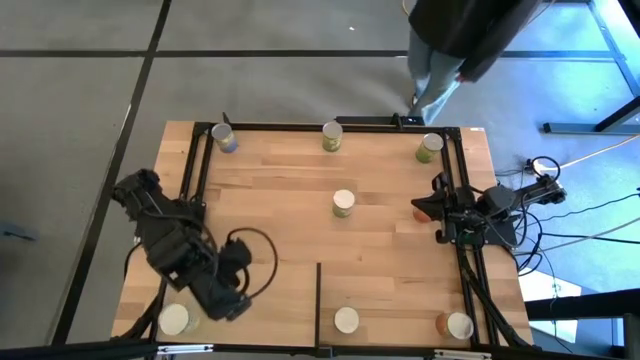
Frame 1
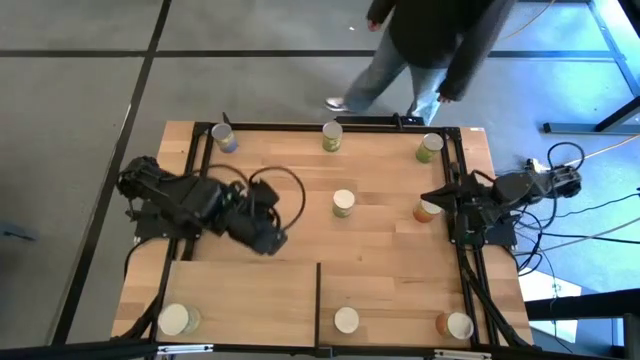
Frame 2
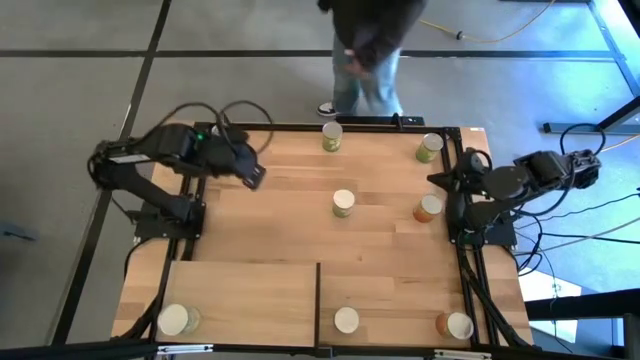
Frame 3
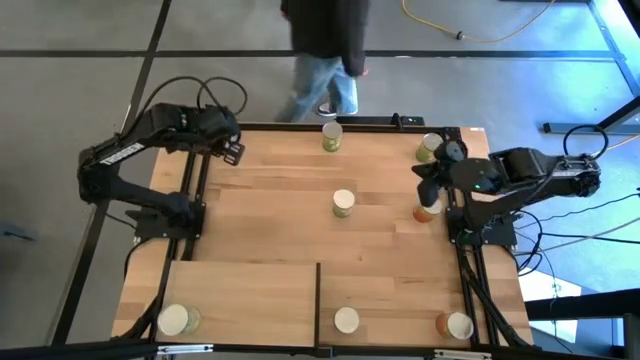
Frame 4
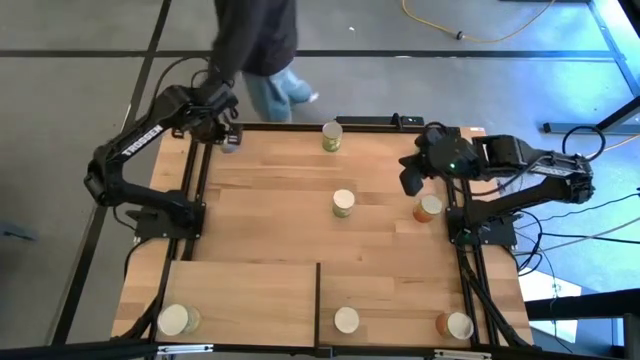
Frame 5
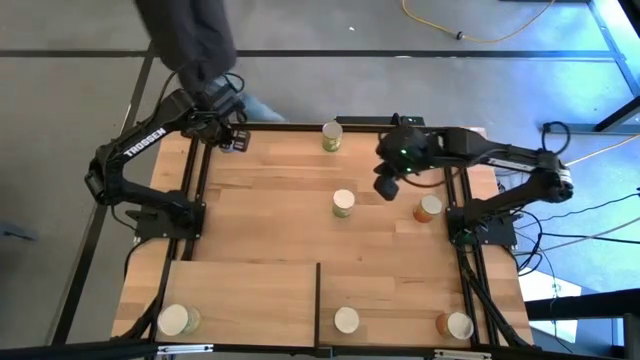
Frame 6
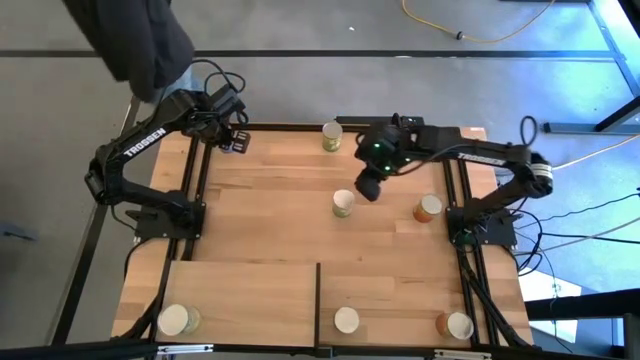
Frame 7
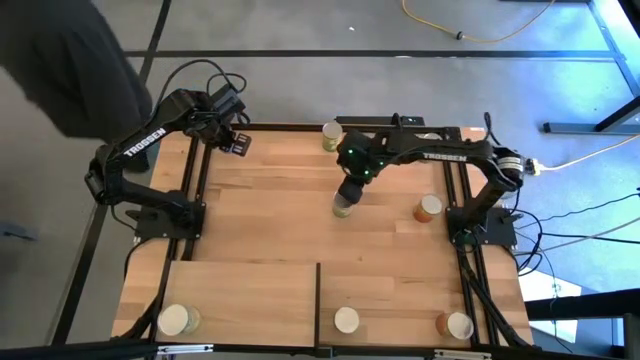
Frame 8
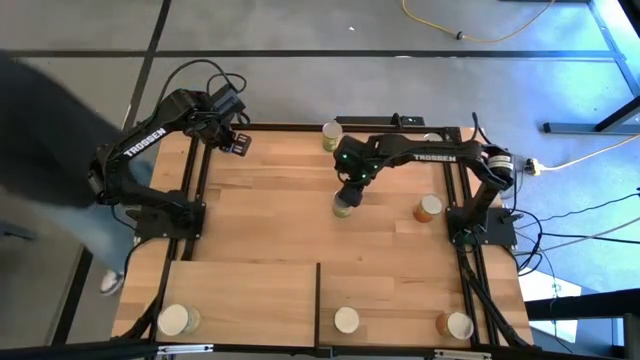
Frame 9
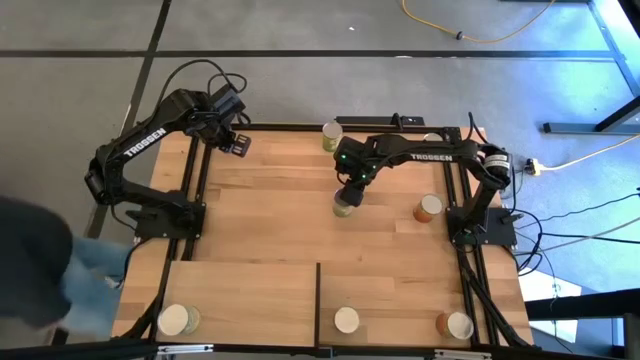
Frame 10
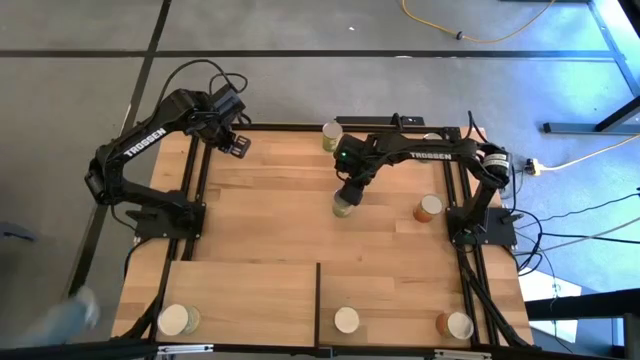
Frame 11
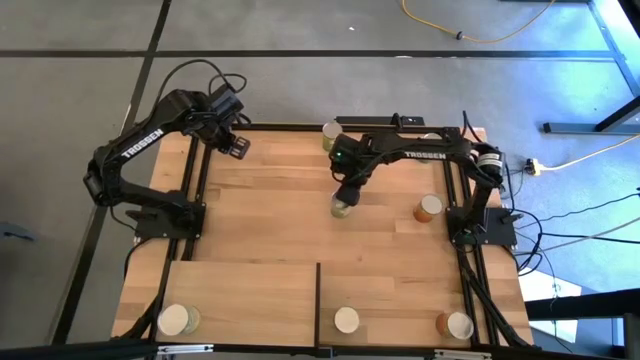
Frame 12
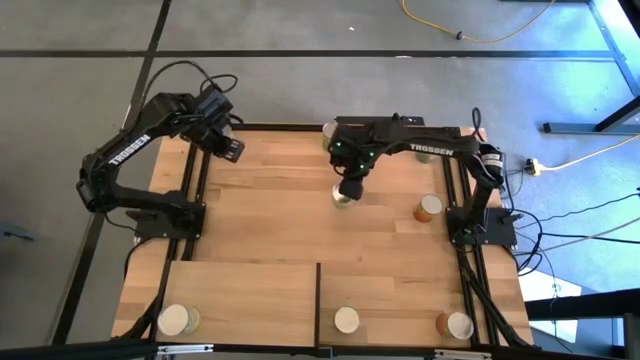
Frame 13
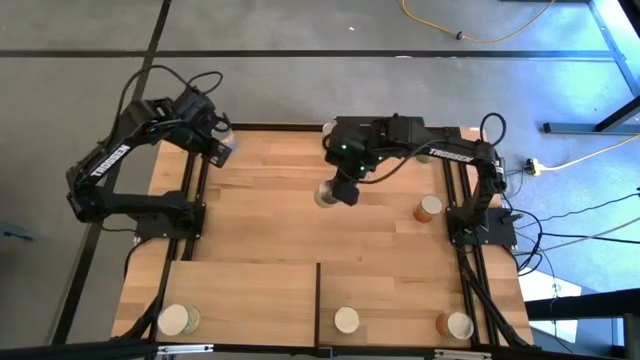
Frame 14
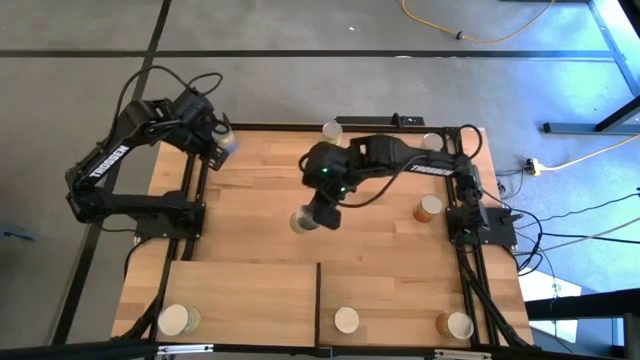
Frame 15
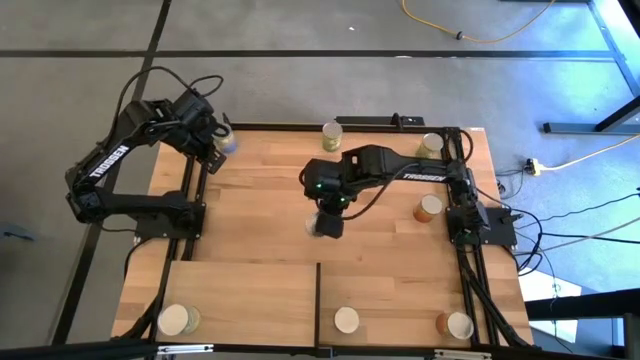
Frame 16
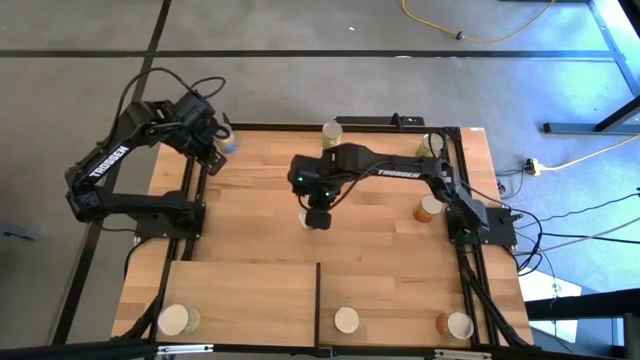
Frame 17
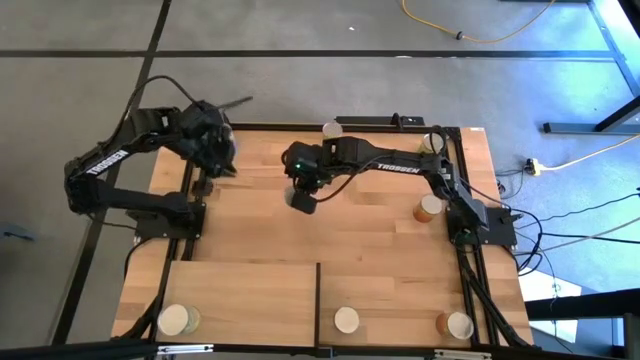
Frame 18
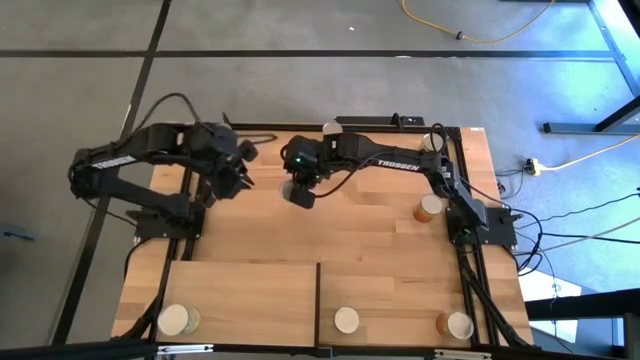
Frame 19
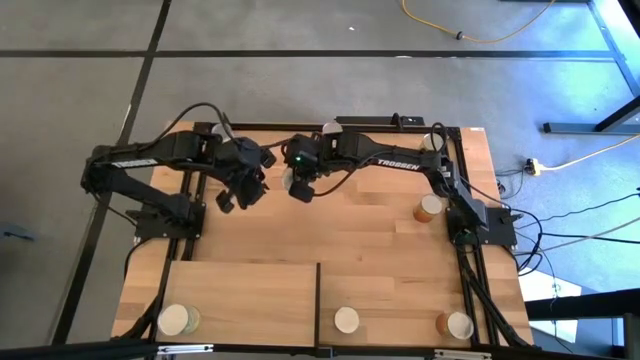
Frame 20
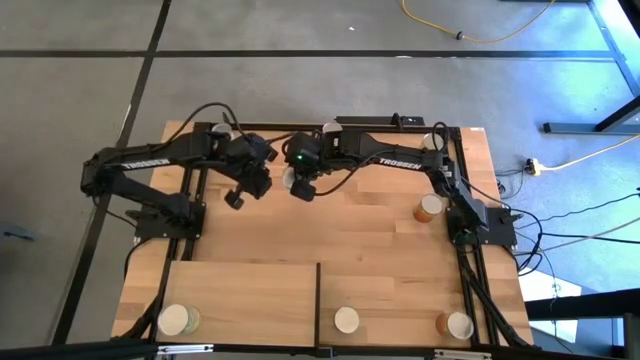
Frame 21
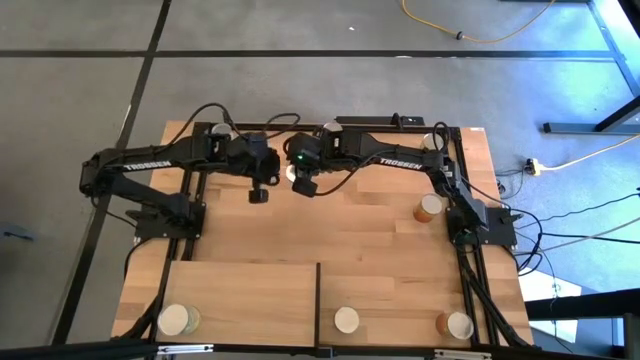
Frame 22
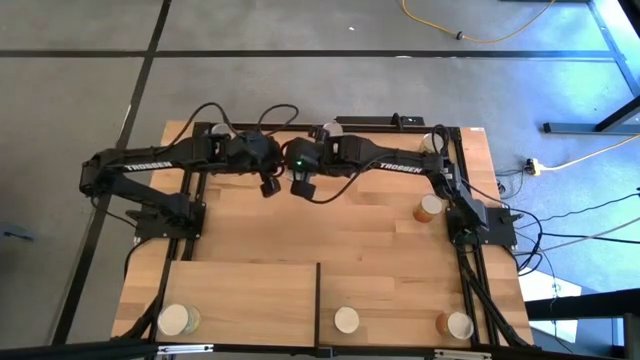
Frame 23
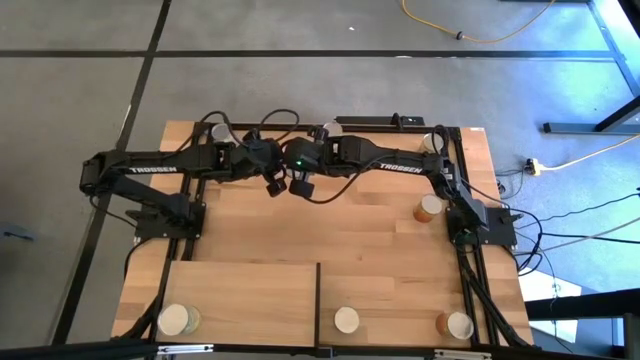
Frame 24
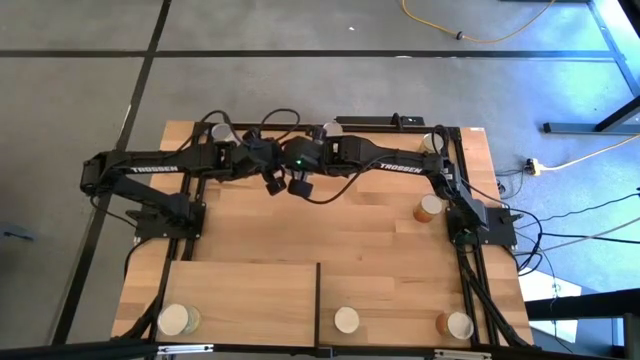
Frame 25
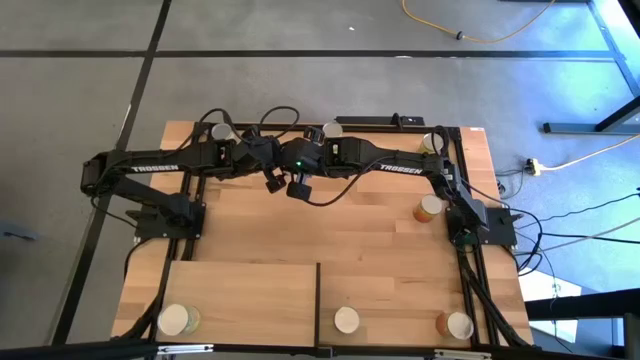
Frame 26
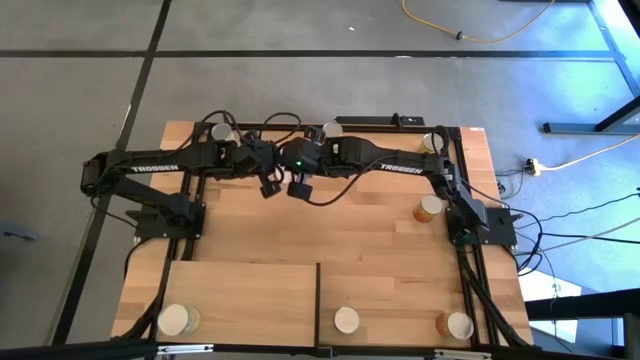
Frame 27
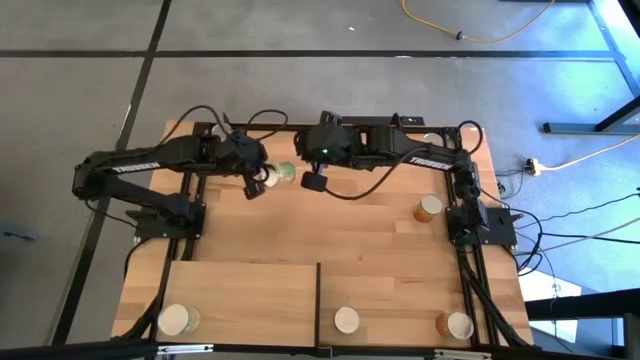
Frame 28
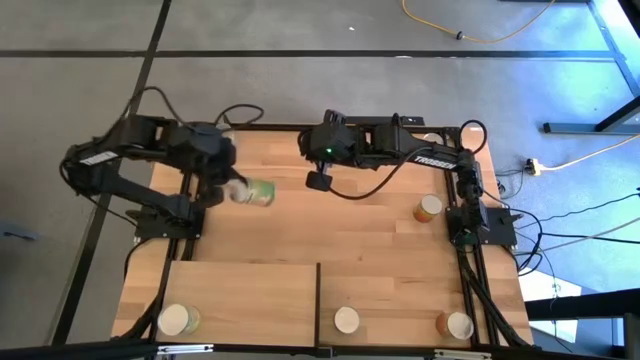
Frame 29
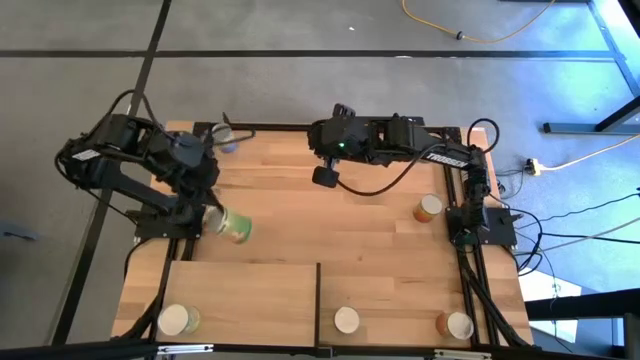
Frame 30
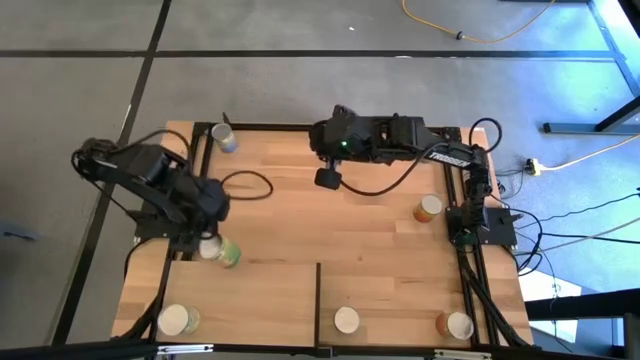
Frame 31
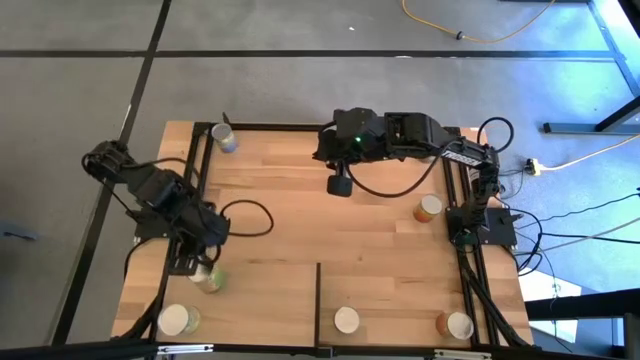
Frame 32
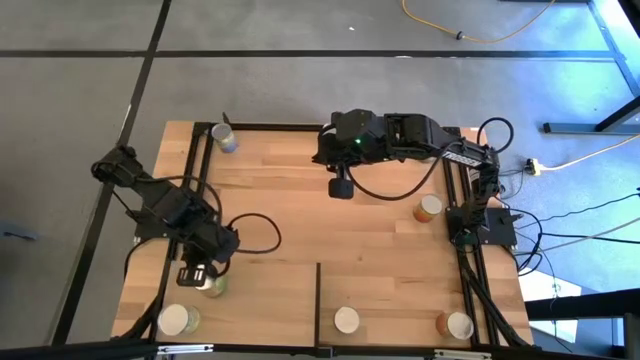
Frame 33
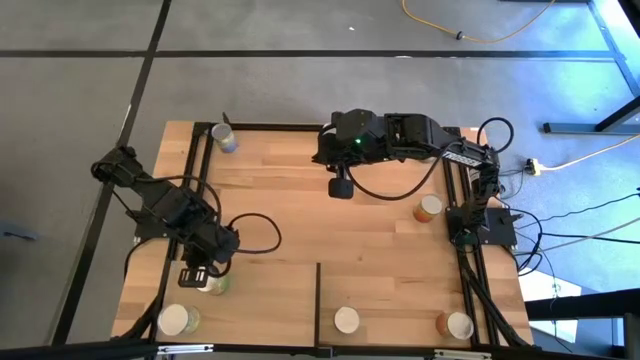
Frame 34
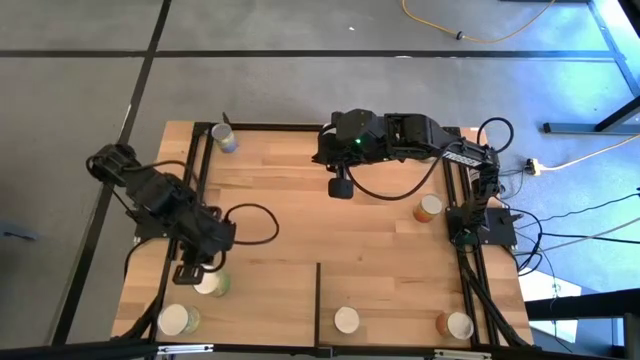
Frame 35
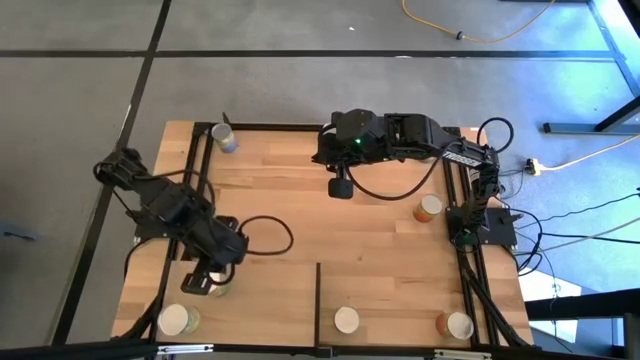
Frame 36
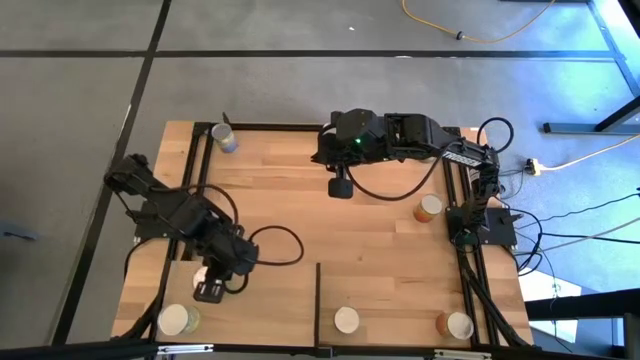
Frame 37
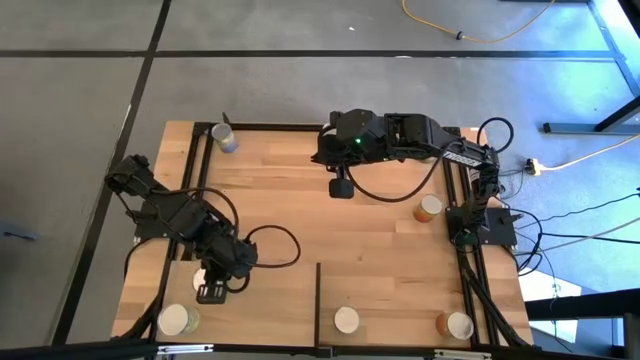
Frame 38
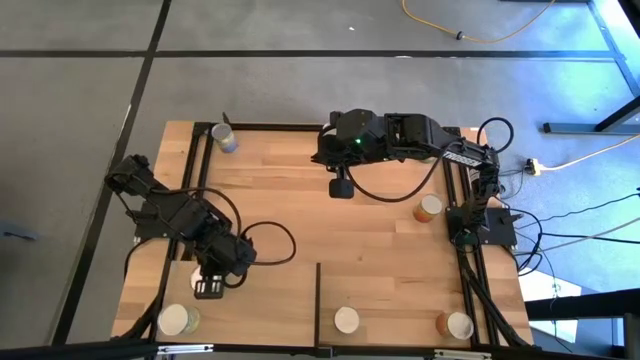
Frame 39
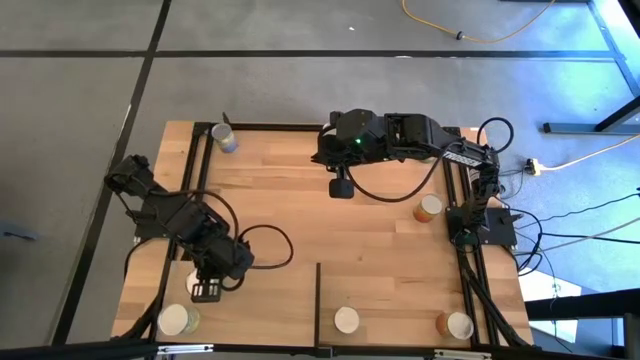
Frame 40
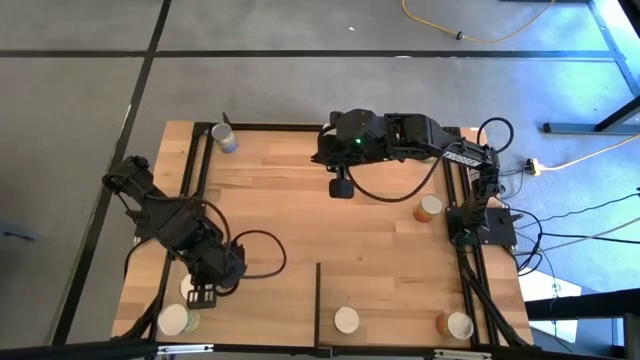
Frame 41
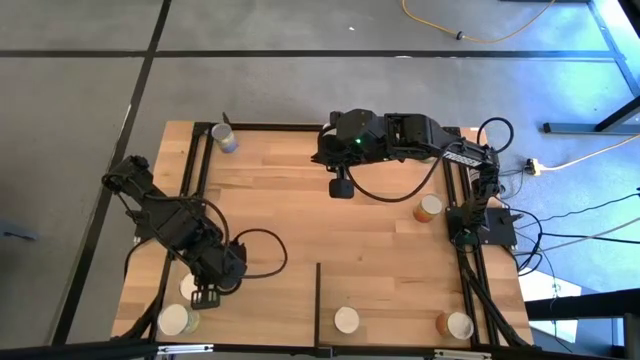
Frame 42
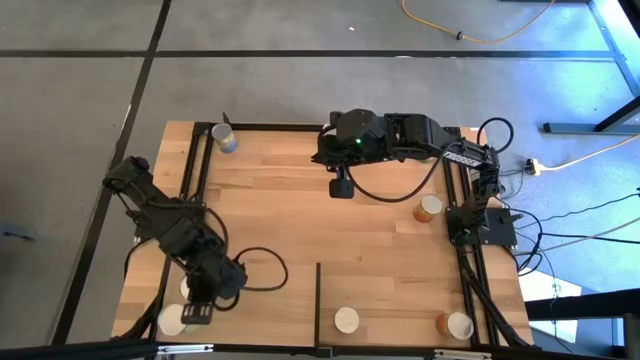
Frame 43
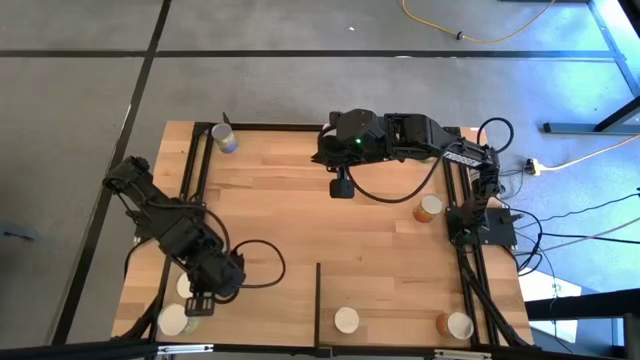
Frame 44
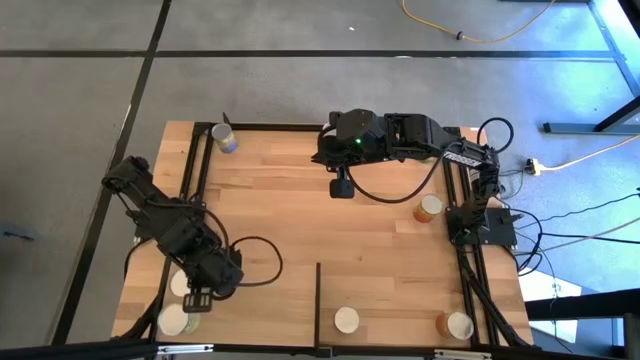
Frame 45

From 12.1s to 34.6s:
Task: Pick and place cans onto a shelf
Put the bottom canned oranges on the shelf
